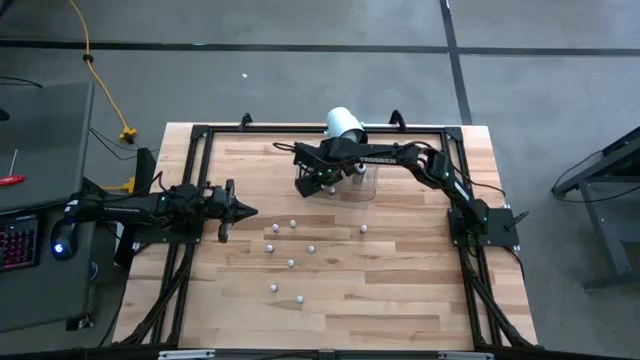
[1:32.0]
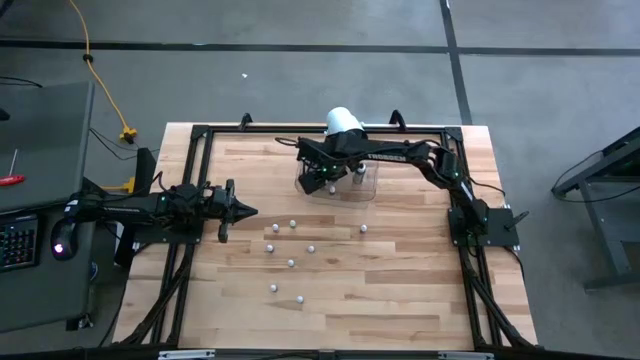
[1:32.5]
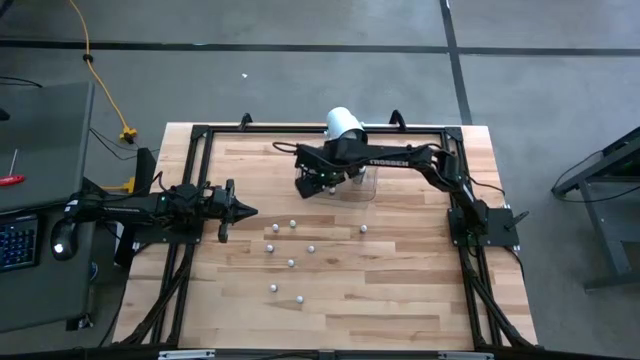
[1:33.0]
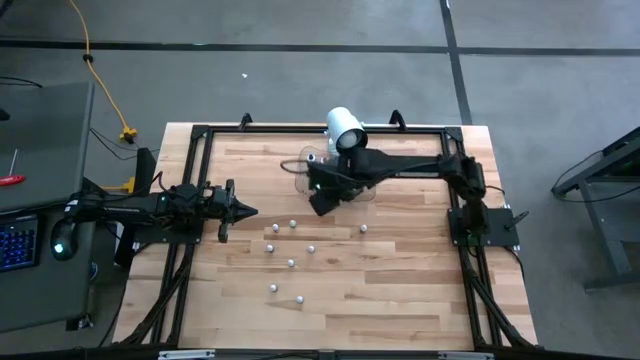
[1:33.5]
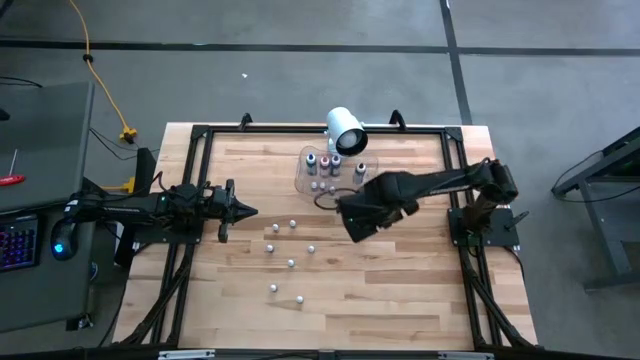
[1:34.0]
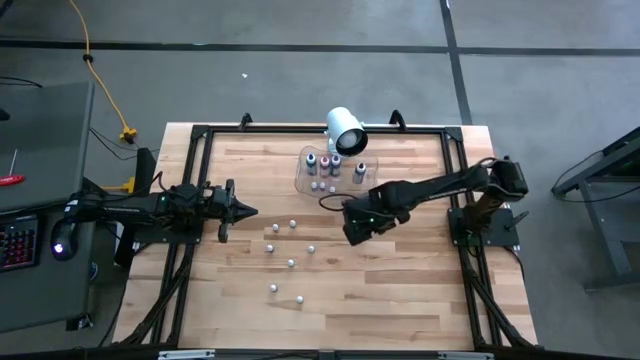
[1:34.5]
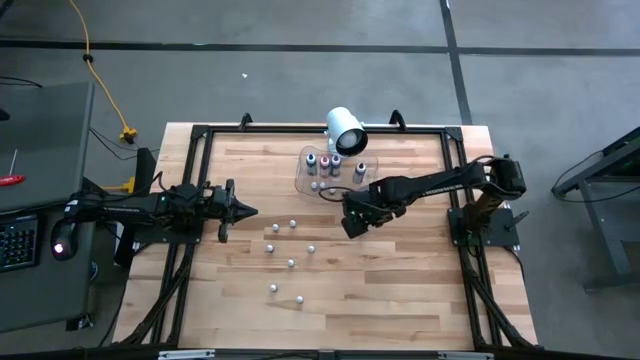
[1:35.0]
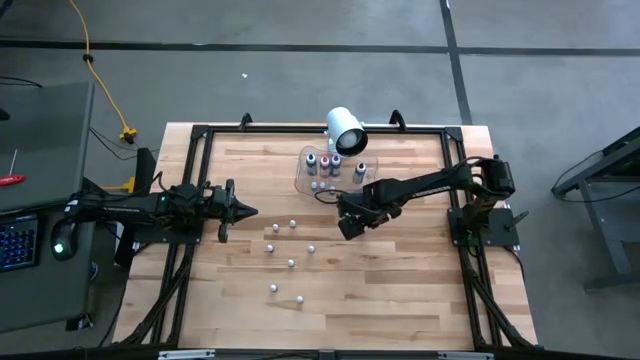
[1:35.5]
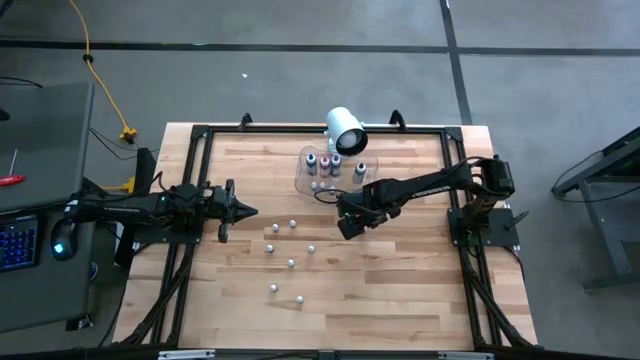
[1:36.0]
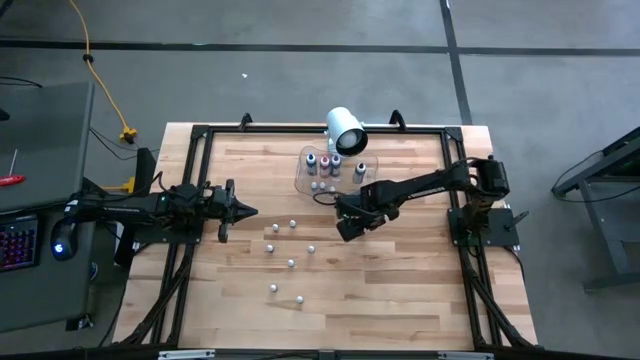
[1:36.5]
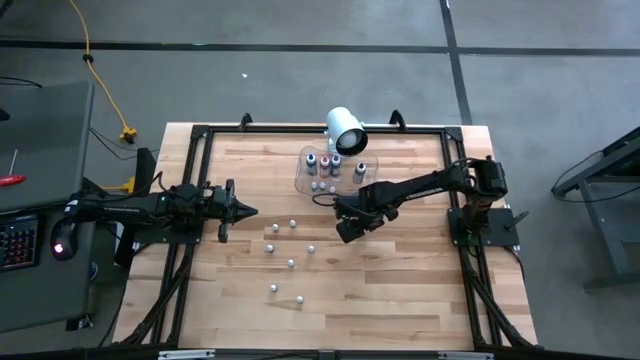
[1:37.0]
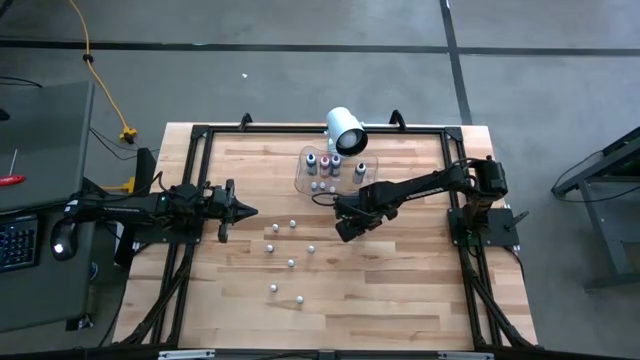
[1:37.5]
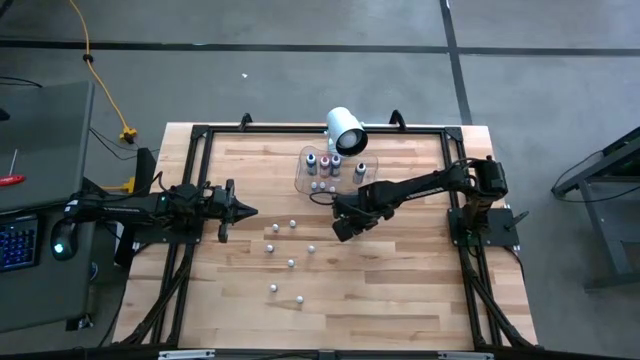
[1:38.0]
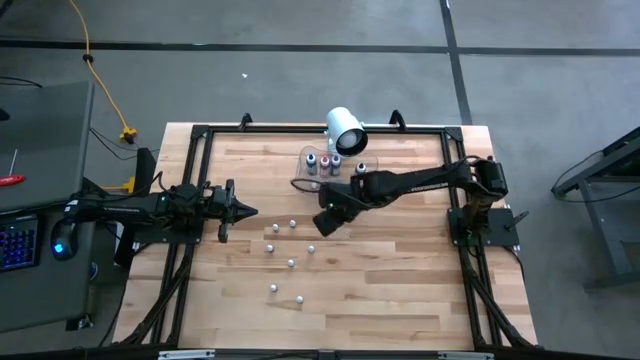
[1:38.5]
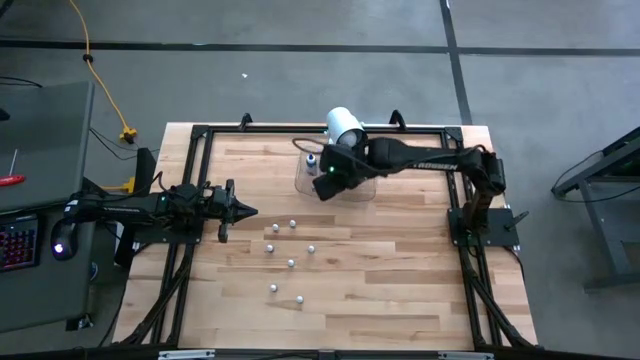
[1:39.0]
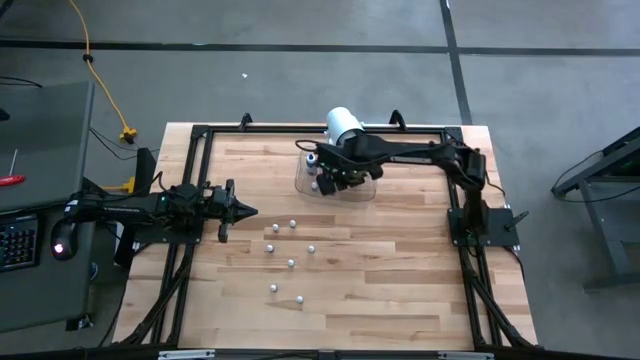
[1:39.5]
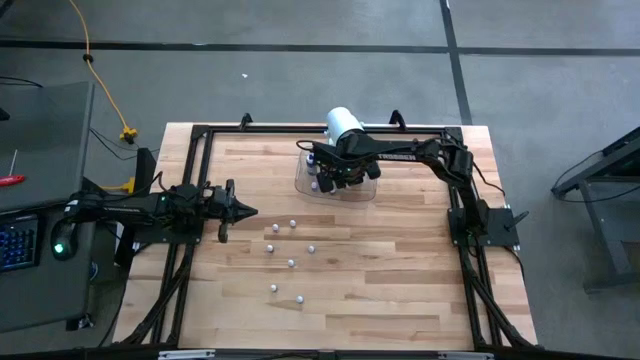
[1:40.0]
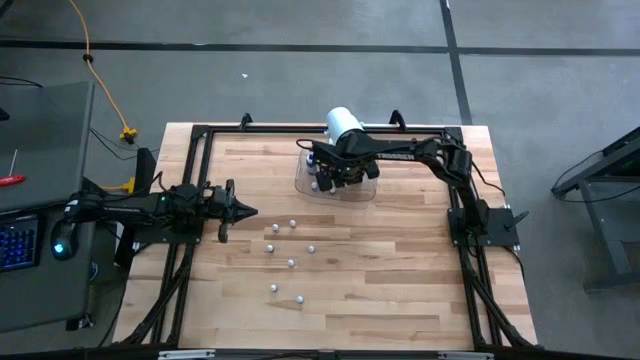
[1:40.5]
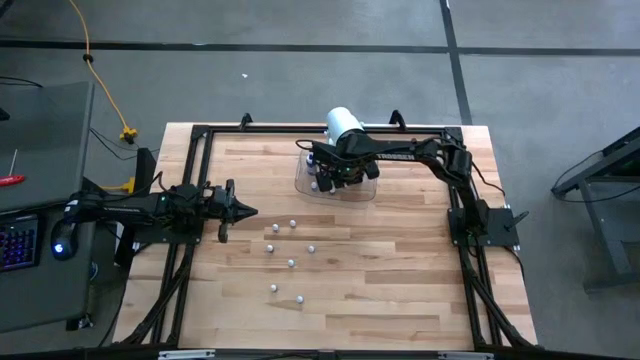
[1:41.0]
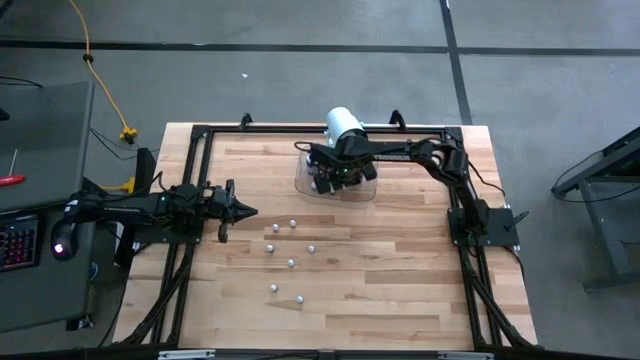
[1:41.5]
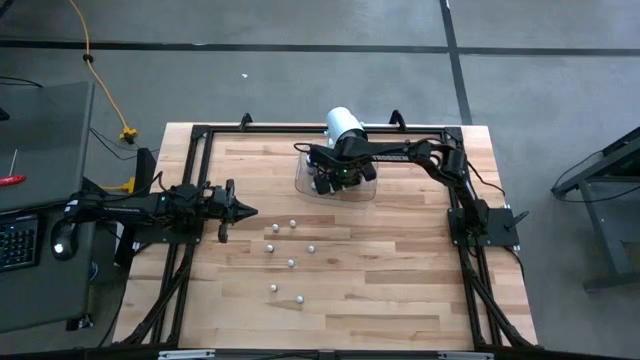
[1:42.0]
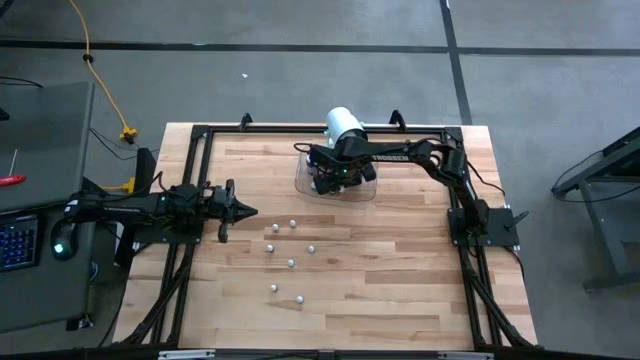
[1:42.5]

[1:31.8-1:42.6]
Task: Pick & Place food coloring
Put the small orange food coloring bottle into the transparent bin

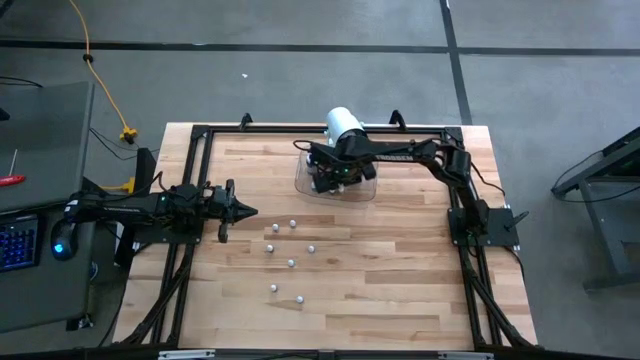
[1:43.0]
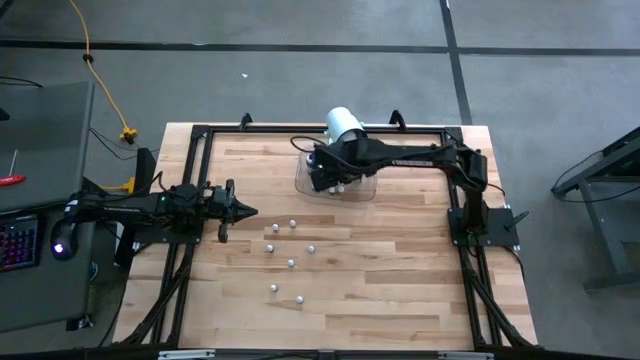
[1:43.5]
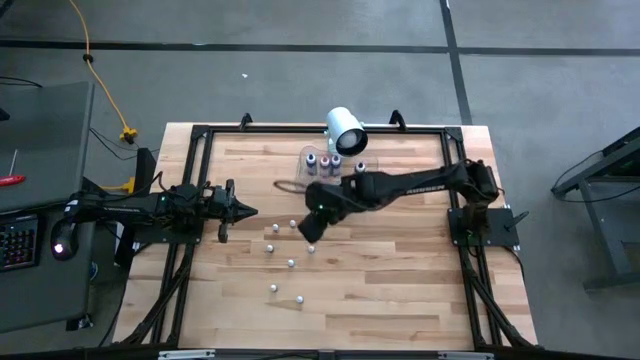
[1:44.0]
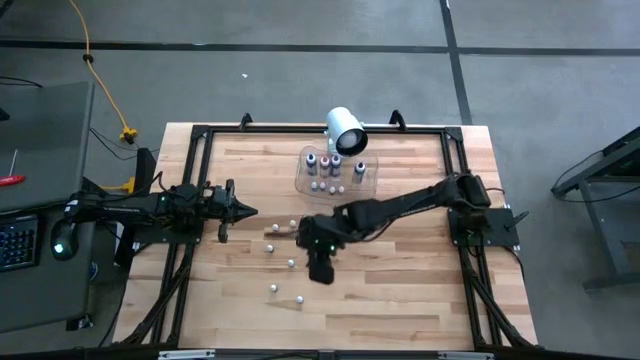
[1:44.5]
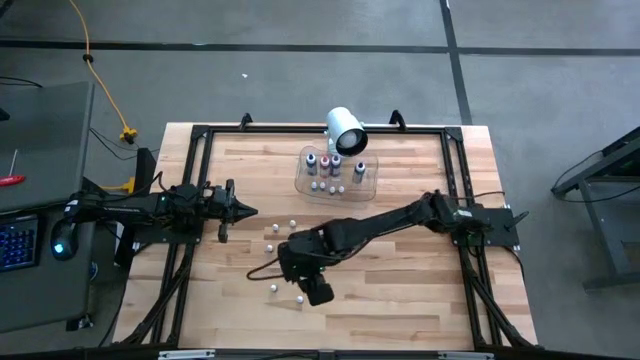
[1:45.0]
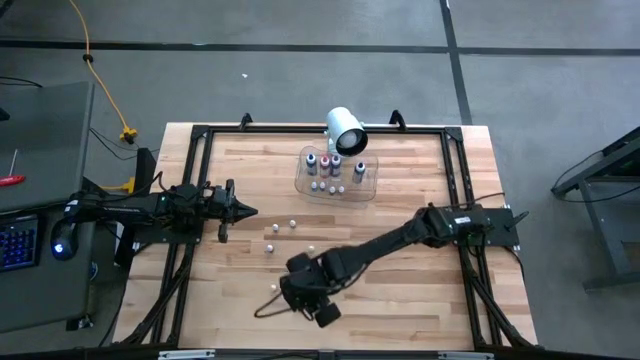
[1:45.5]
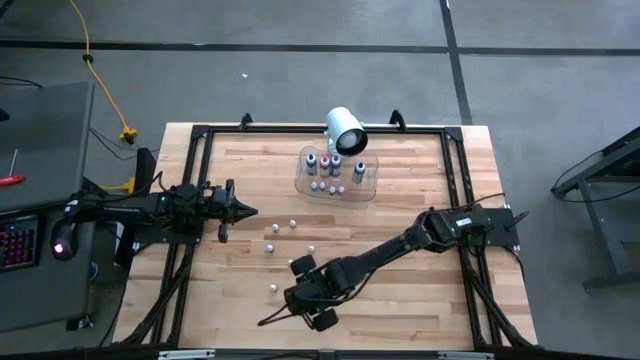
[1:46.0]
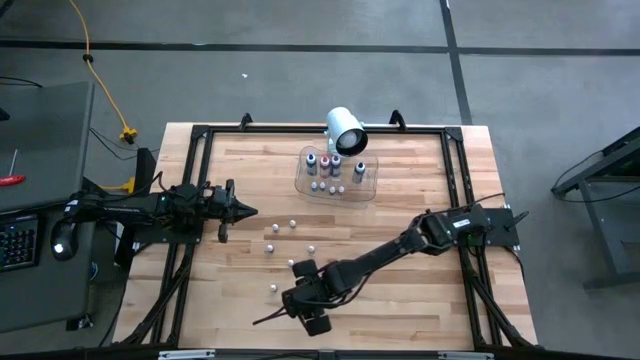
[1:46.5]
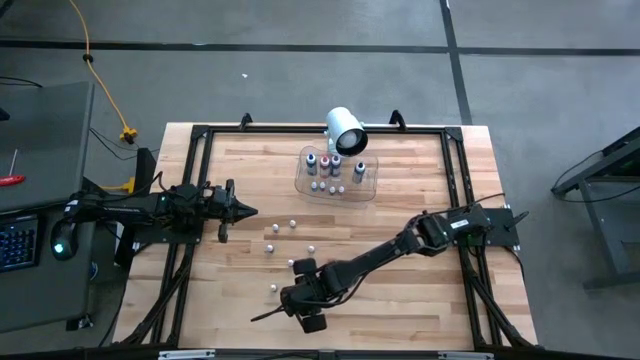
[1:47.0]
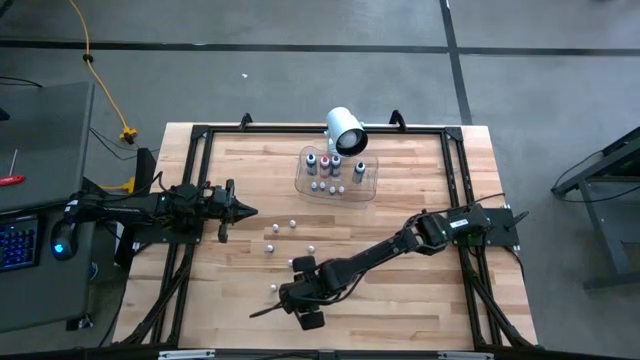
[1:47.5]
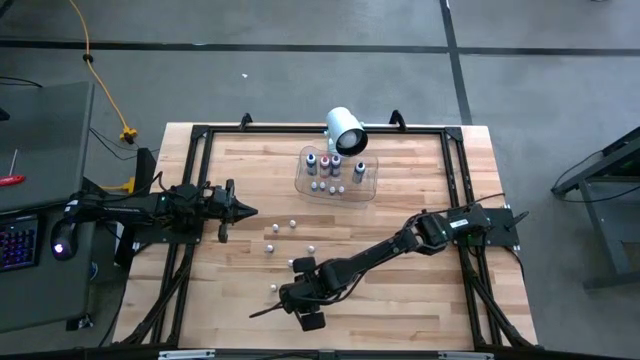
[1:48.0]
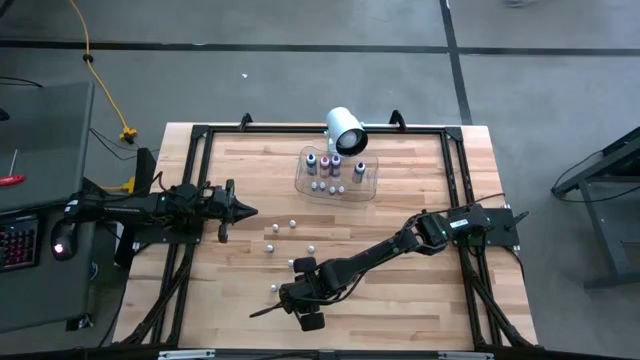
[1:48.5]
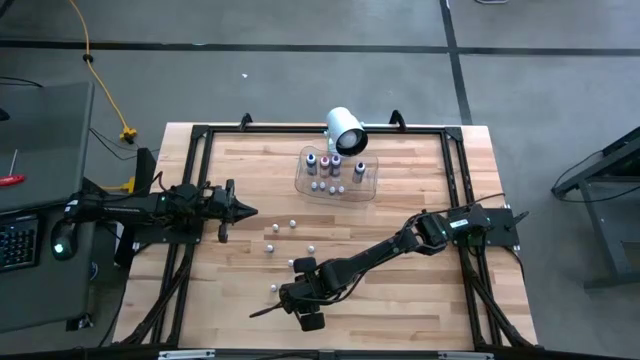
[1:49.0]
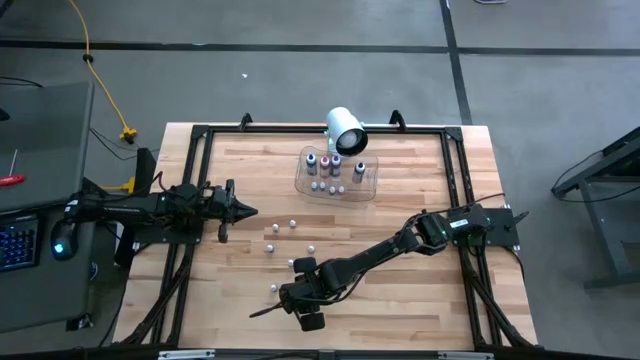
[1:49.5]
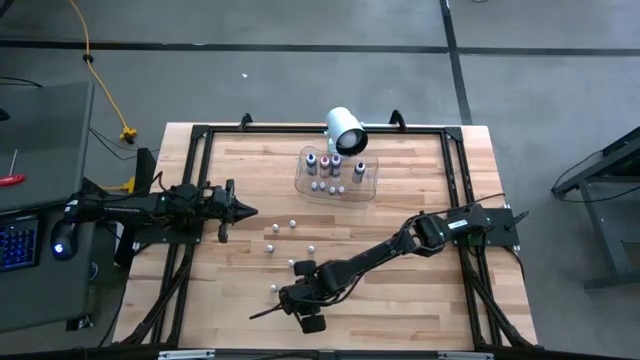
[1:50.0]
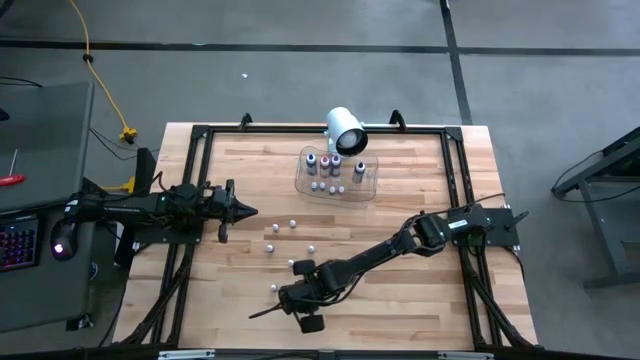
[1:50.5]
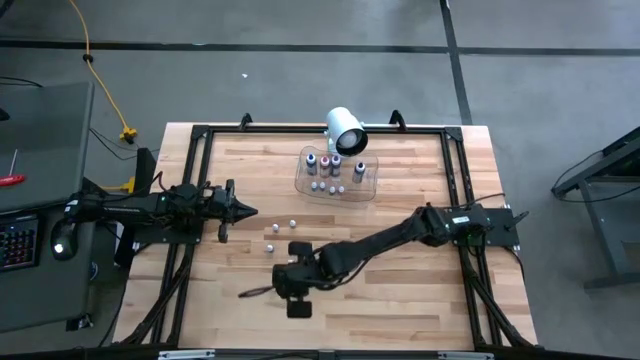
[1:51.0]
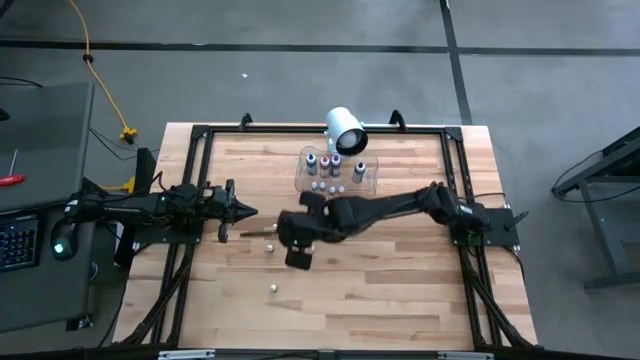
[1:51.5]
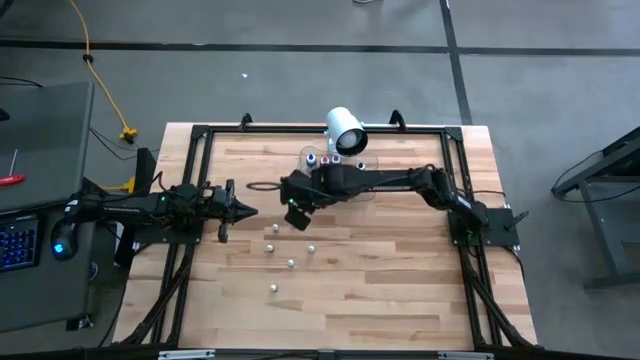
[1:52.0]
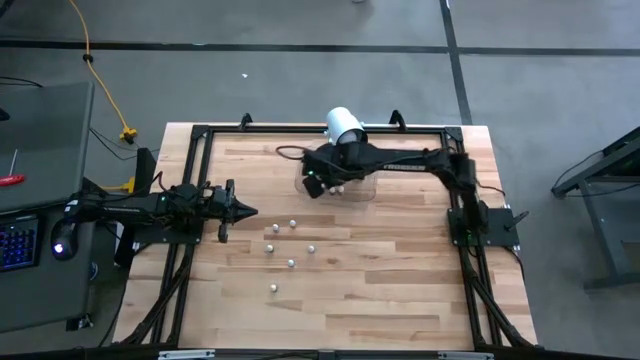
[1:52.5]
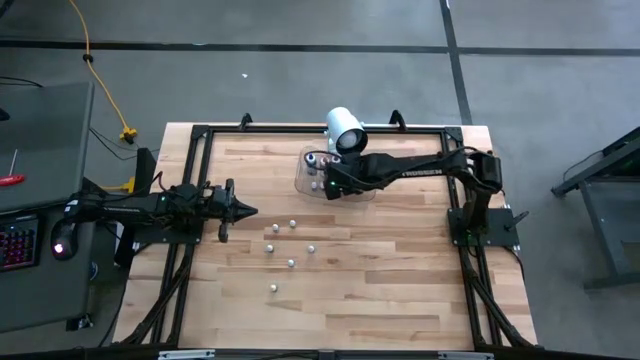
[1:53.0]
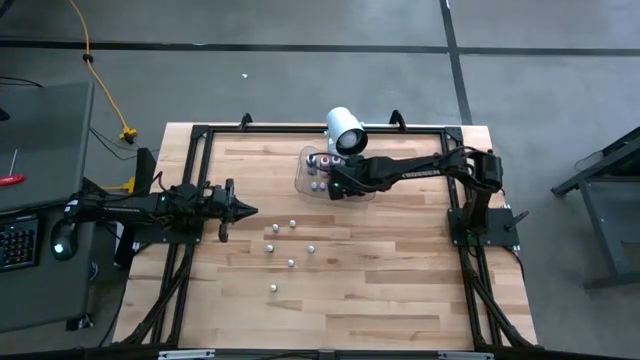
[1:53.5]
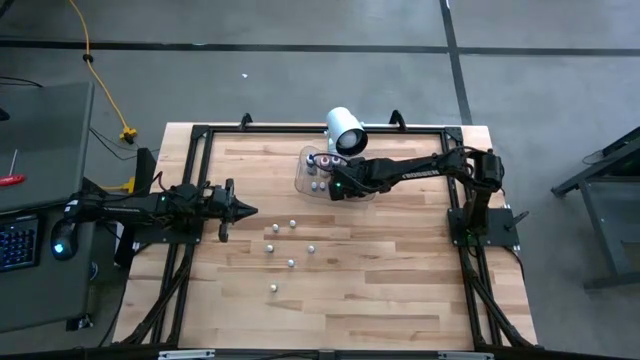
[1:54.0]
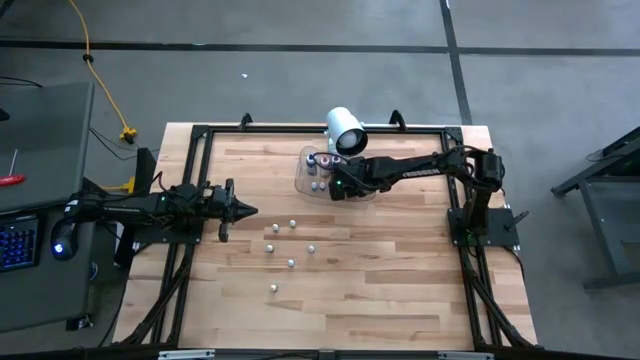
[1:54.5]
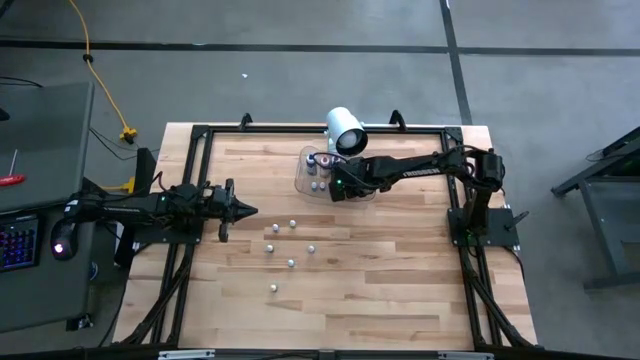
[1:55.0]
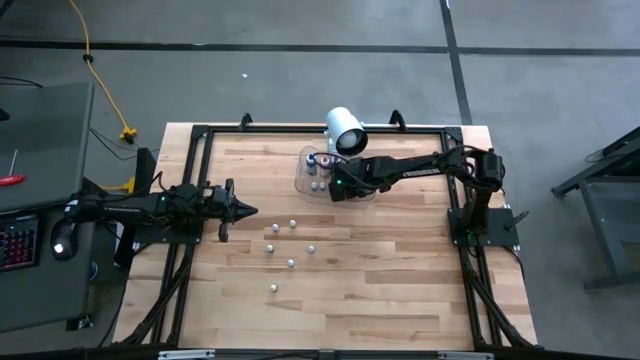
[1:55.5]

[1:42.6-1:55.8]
Put the small black food coloring bottle into the transparent bin
